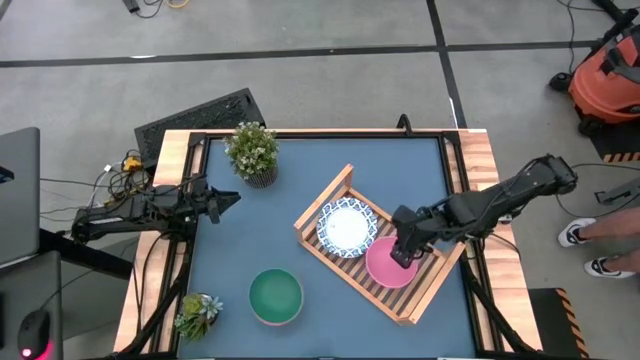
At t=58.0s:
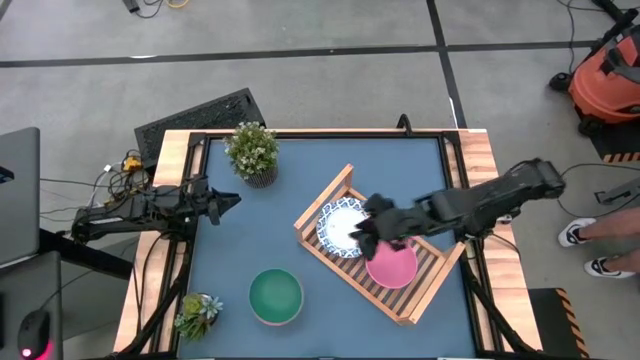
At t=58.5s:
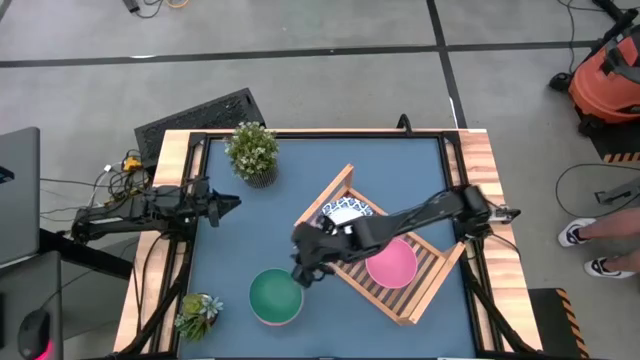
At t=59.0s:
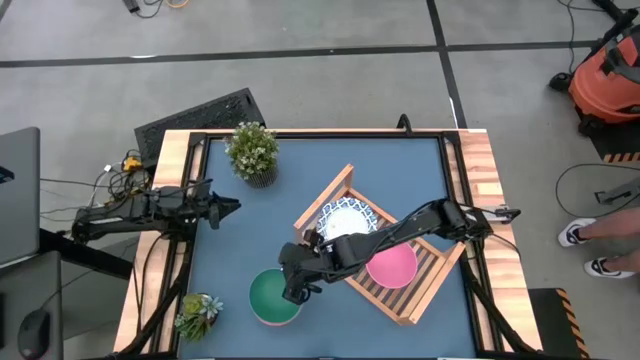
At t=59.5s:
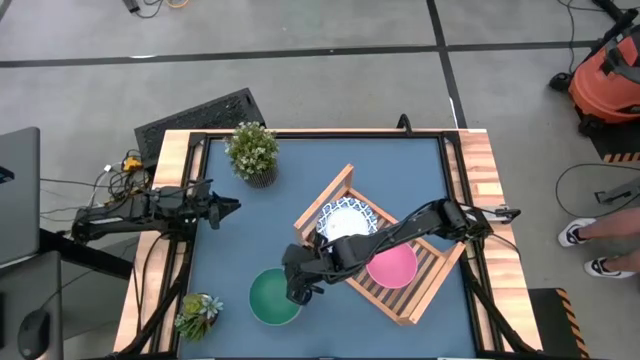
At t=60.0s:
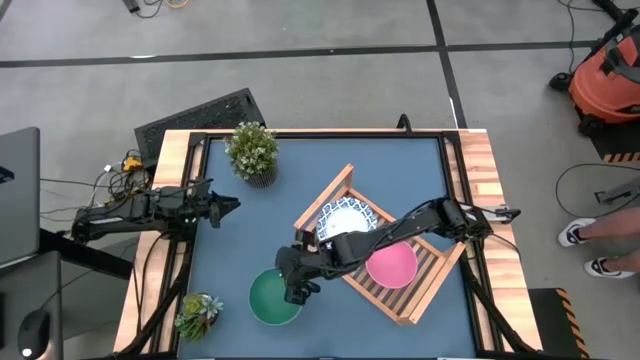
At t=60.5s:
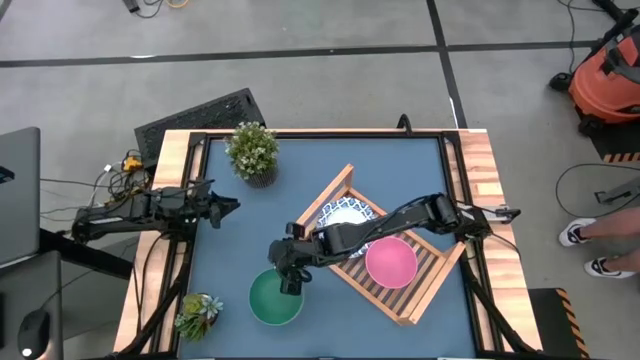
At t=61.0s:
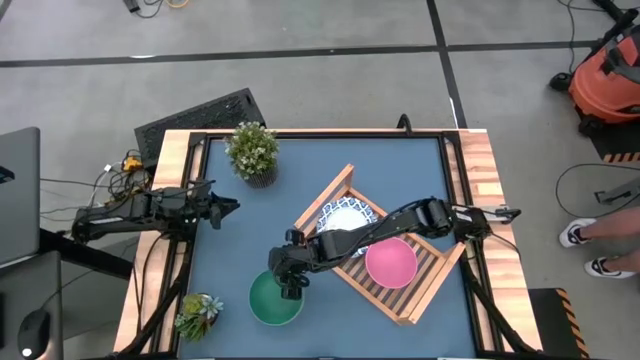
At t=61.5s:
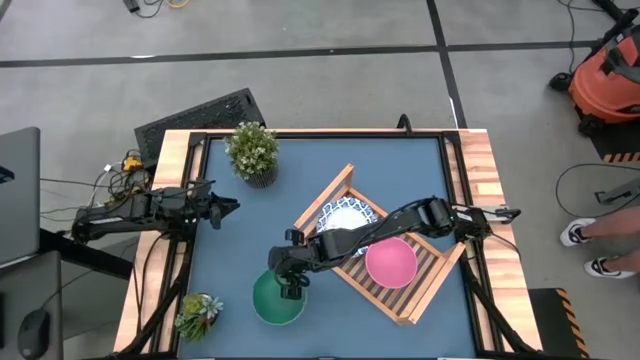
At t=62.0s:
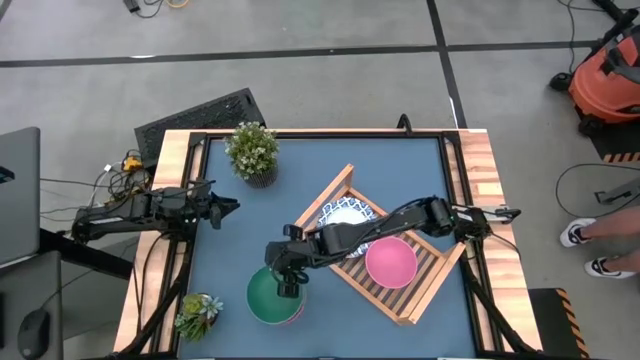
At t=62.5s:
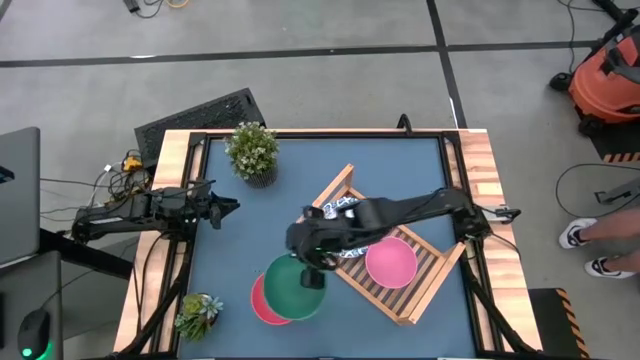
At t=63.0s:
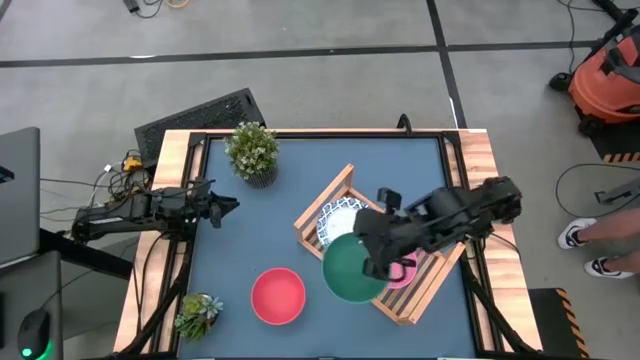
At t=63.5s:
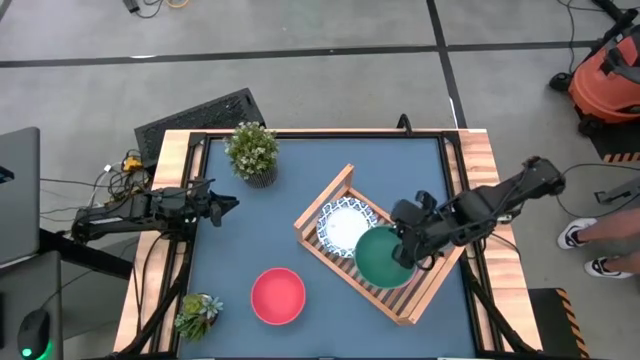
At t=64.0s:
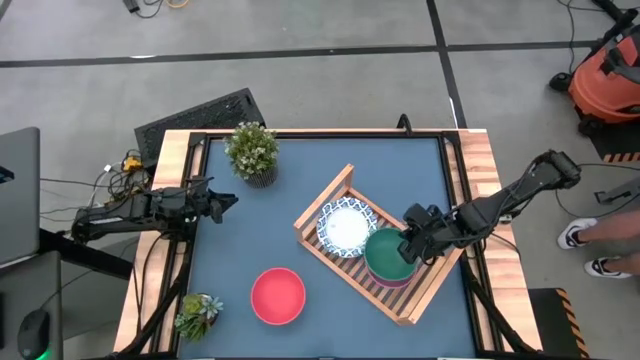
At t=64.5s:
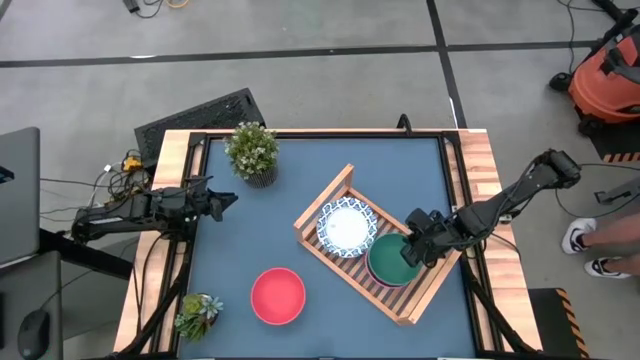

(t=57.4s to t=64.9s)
Task: Place and stack bowls onto a shelf
Stack the green bowl on the top of the pink bowl on the shelf

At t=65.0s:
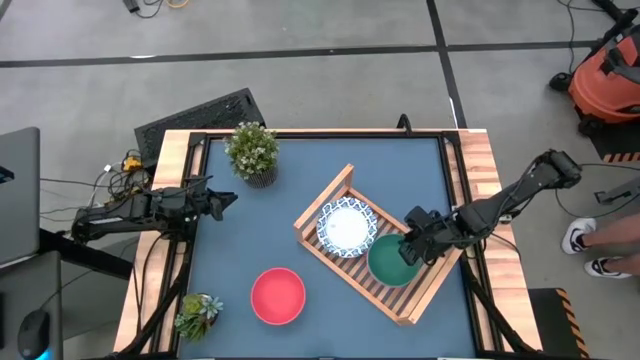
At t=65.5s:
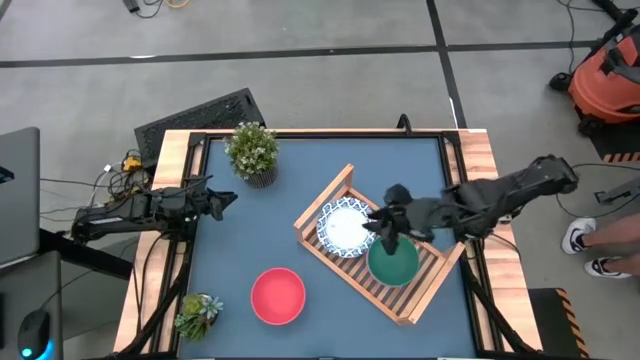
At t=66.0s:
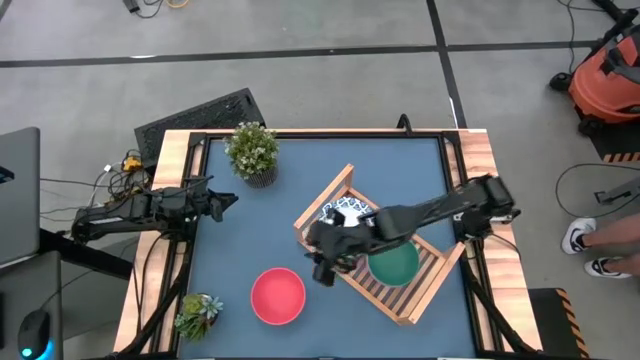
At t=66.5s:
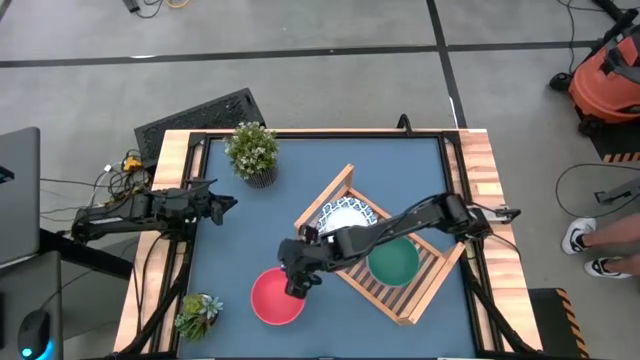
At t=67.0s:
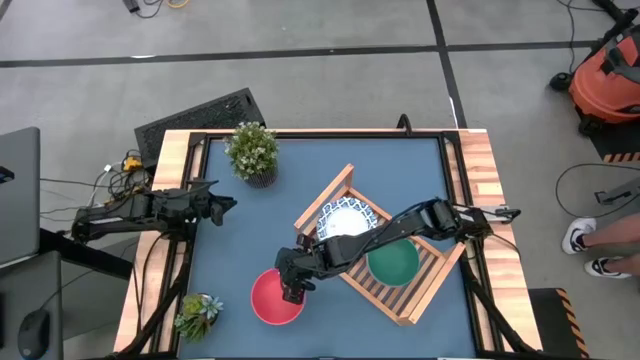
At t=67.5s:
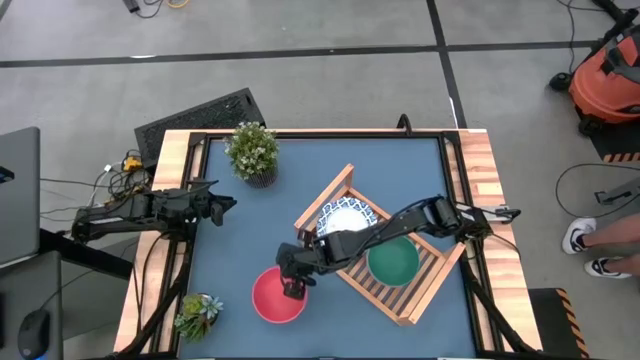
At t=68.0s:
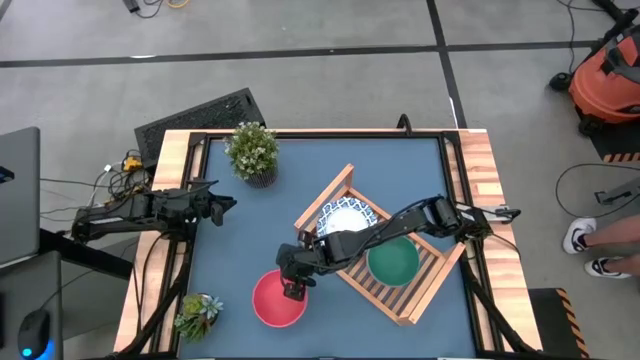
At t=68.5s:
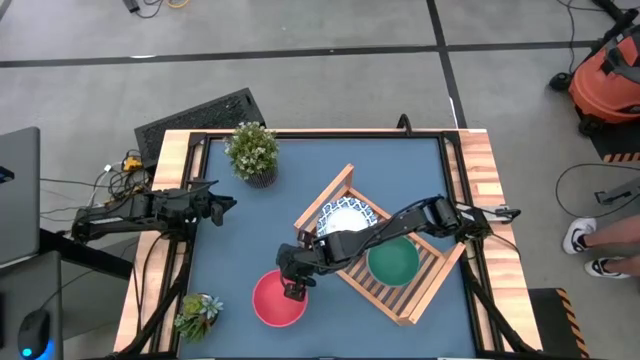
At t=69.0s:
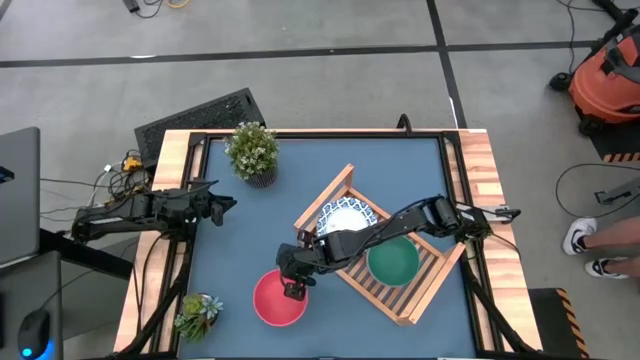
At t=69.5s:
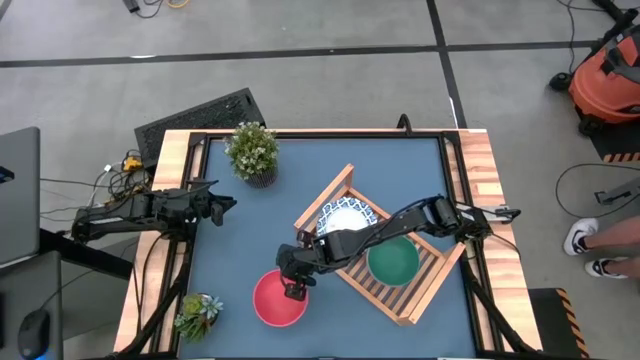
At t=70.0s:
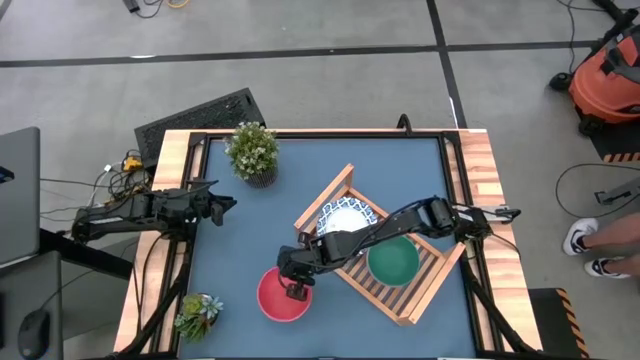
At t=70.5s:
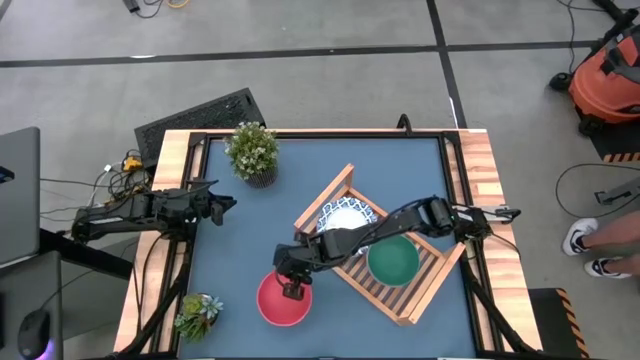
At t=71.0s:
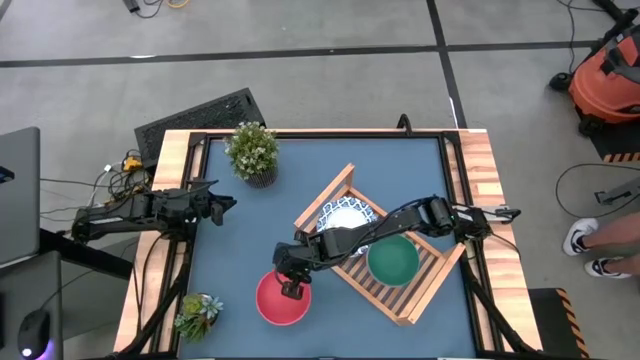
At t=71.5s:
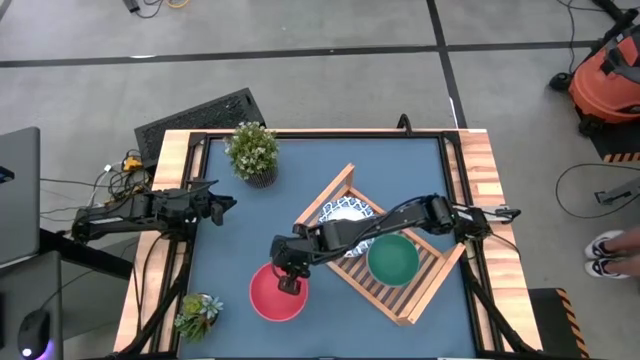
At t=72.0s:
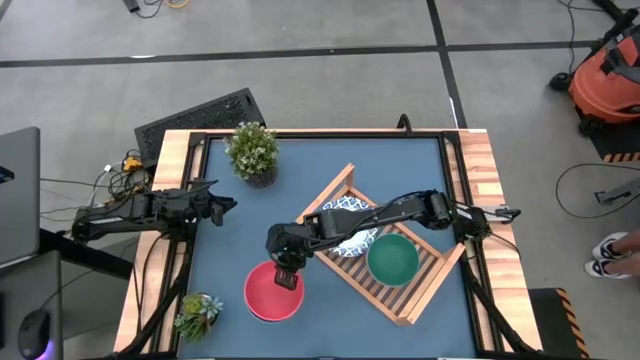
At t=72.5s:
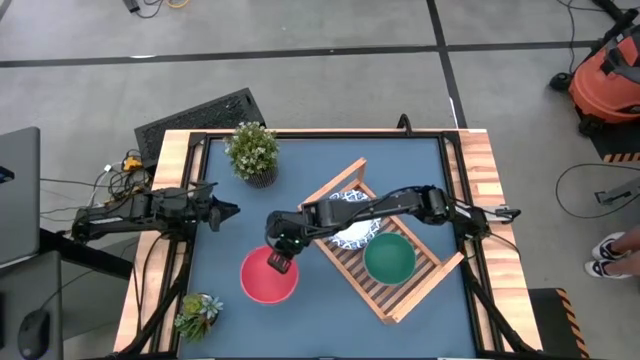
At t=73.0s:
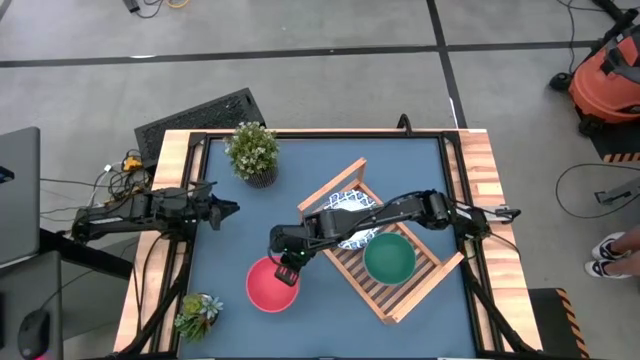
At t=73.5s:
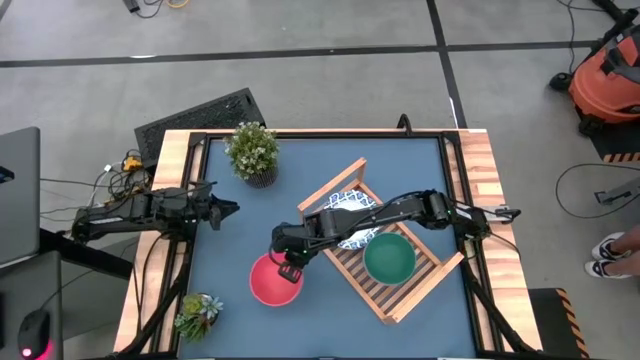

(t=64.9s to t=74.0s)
Stack the orange bowl on the top of the green bowl on the shelf

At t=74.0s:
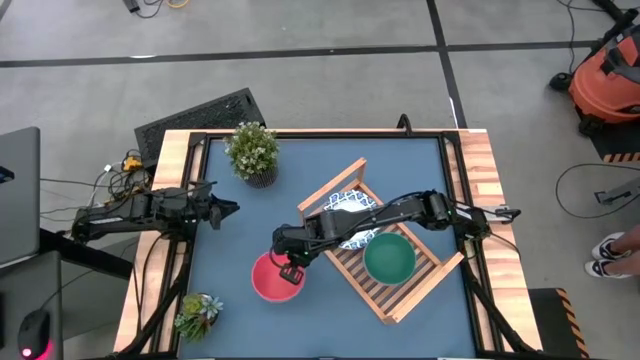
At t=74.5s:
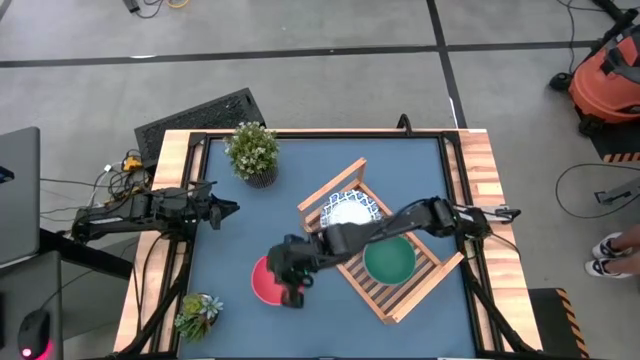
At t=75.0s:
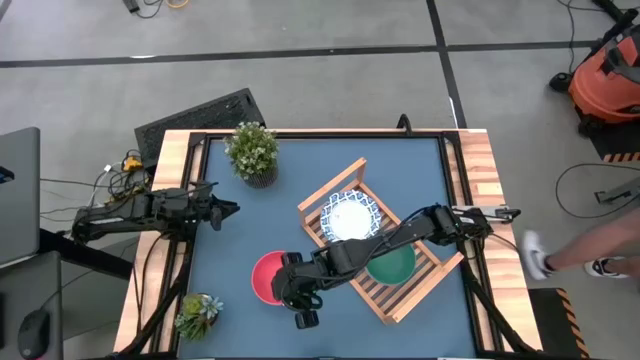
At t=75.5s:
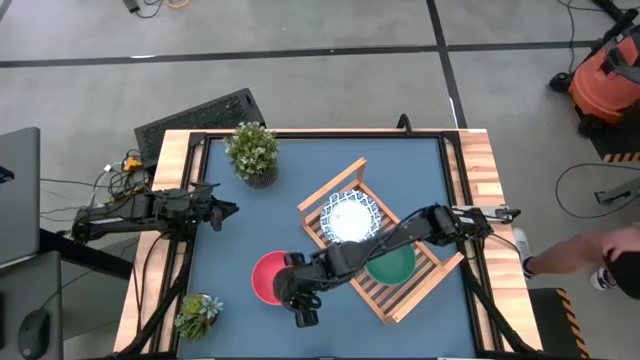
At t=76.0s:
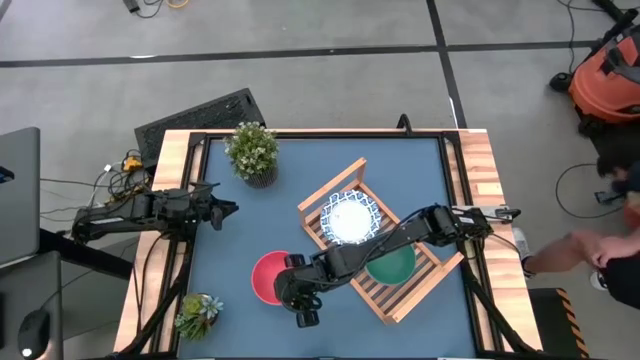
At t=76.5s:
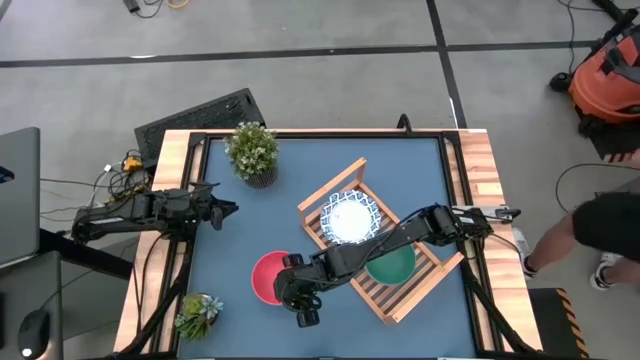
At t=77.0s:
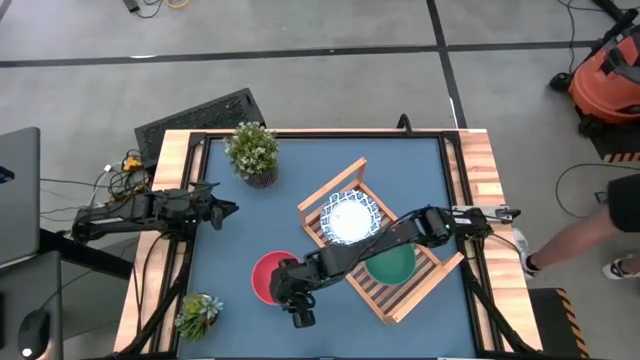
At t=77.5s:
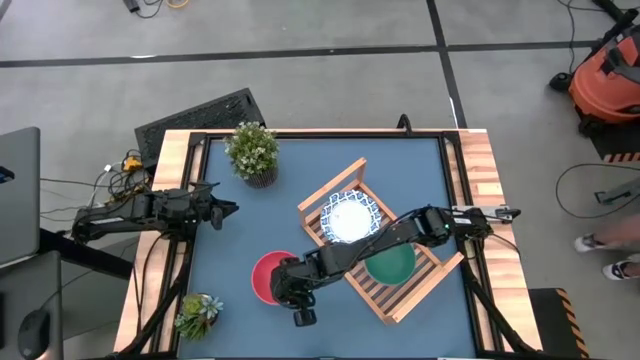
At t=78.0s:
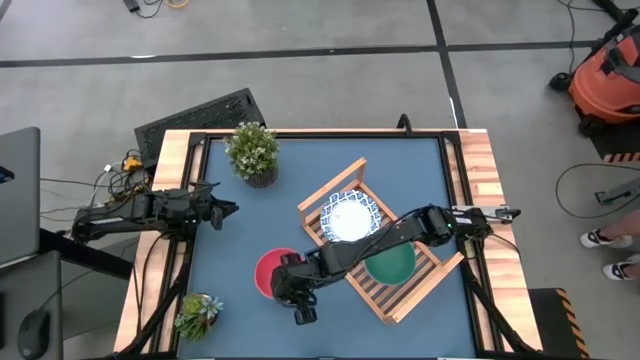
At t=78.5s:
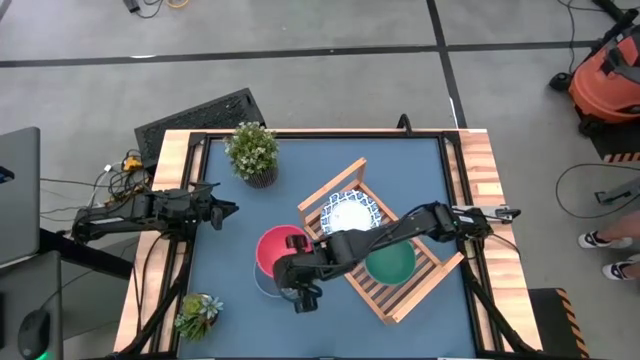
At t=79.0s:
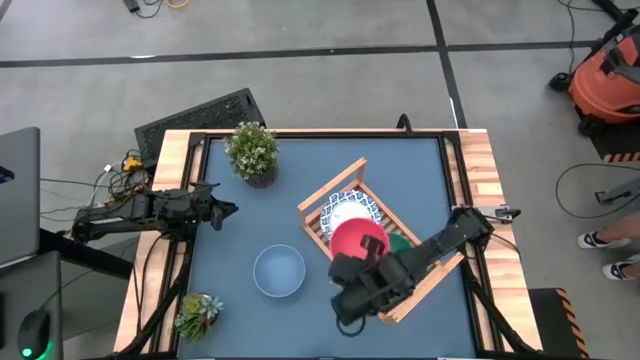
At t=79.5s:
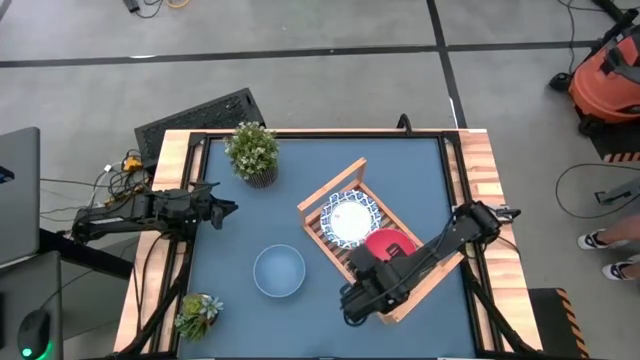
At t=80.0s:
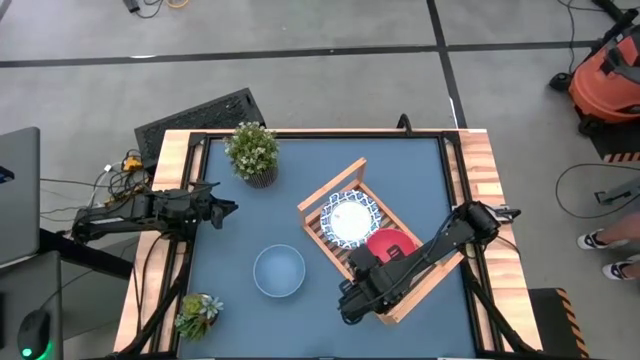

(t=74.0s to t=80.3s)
Stack the orange bowl on the top of the green bowl on the shelf
